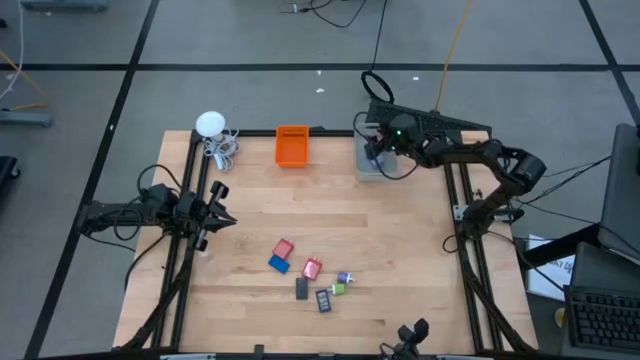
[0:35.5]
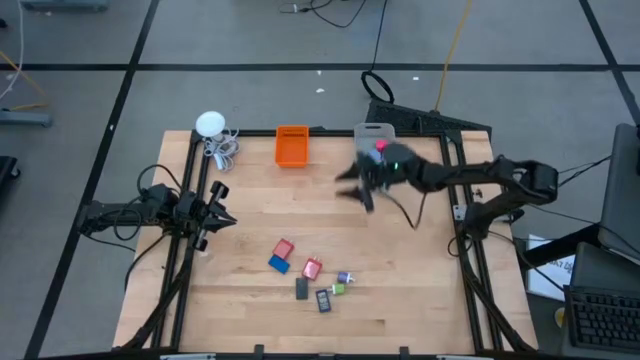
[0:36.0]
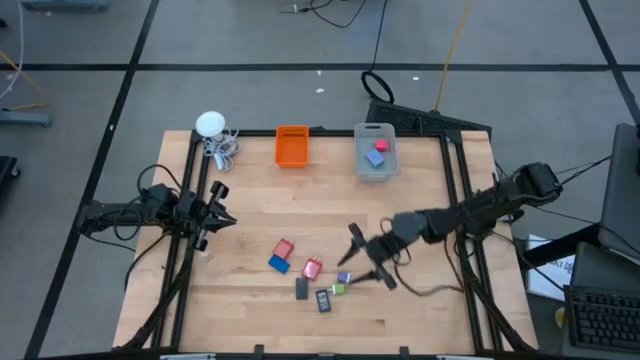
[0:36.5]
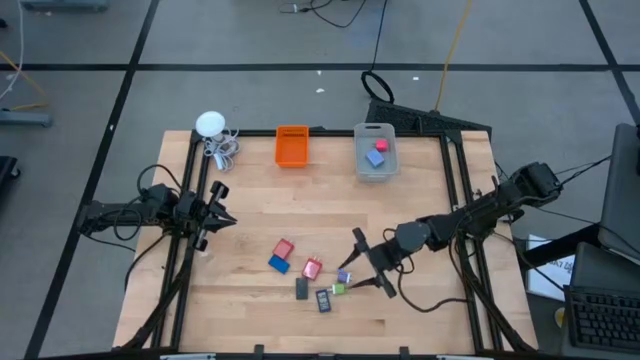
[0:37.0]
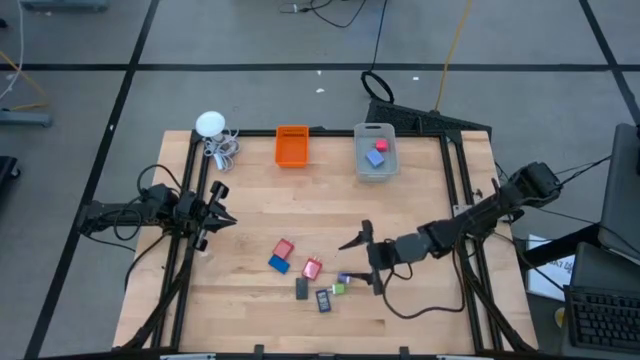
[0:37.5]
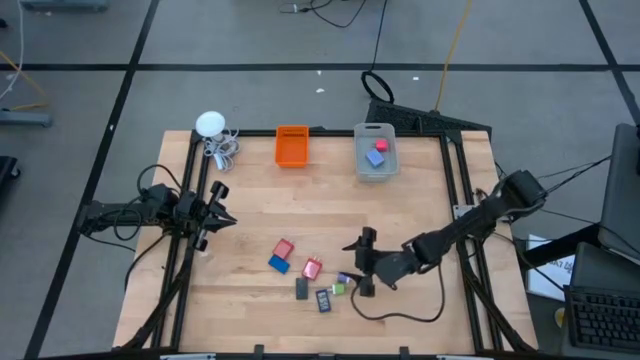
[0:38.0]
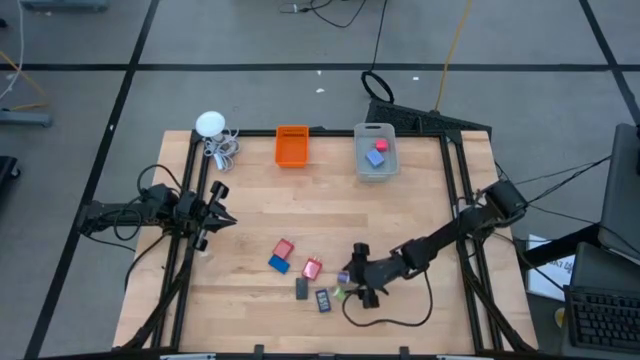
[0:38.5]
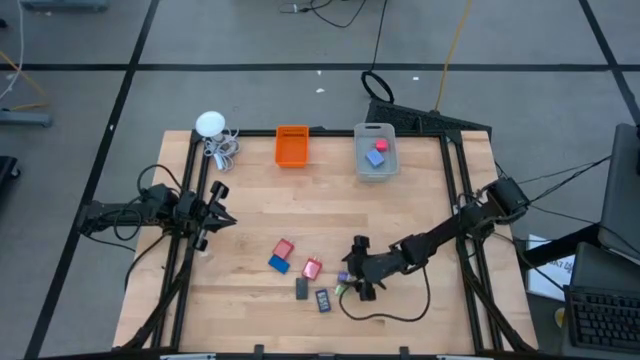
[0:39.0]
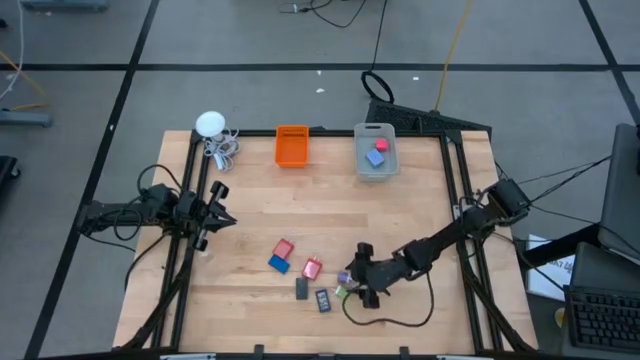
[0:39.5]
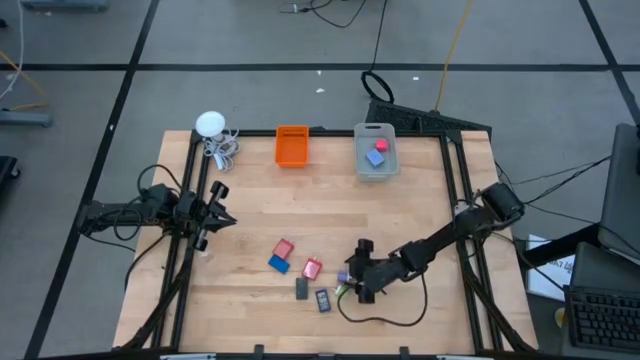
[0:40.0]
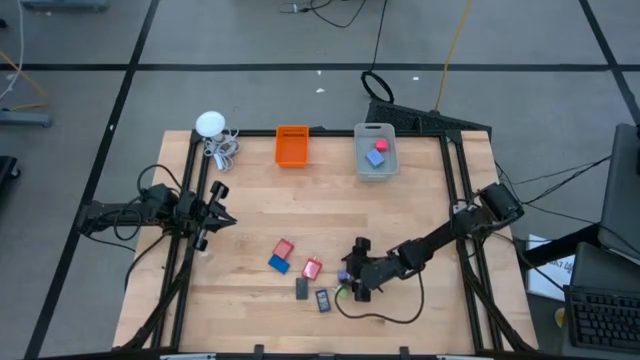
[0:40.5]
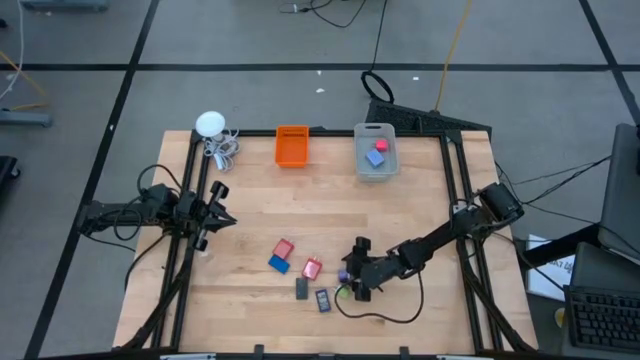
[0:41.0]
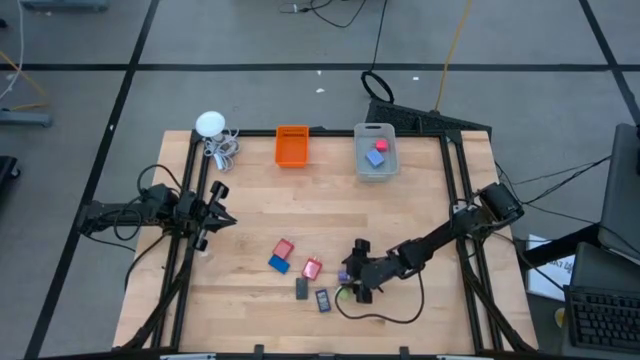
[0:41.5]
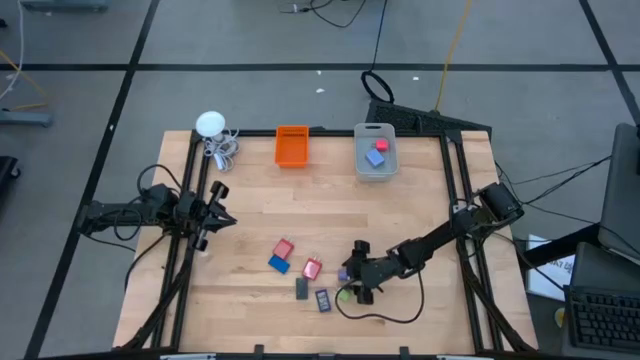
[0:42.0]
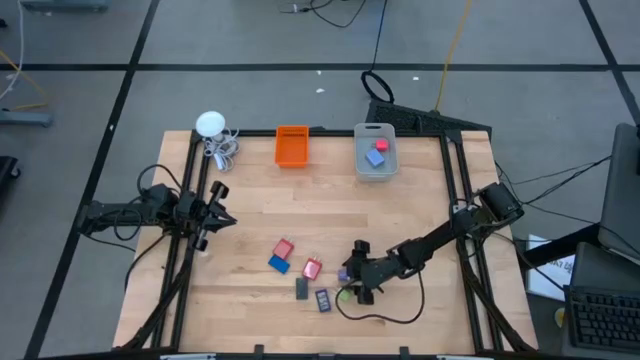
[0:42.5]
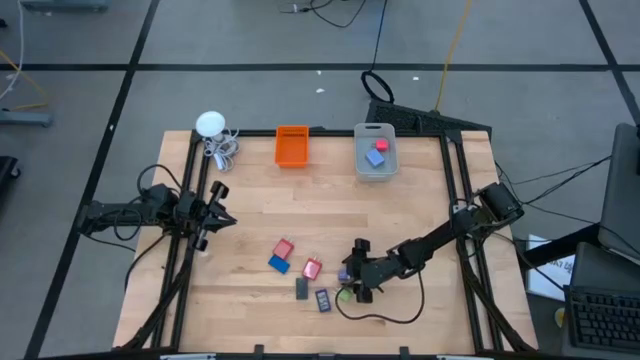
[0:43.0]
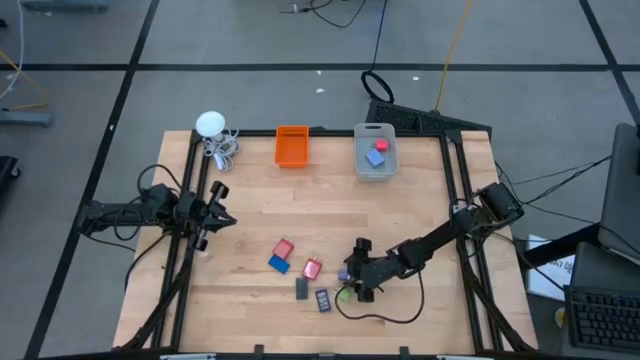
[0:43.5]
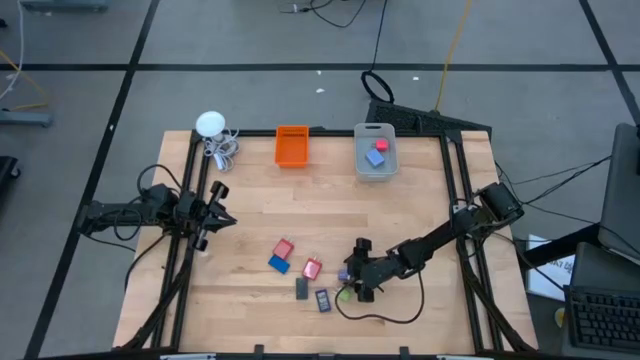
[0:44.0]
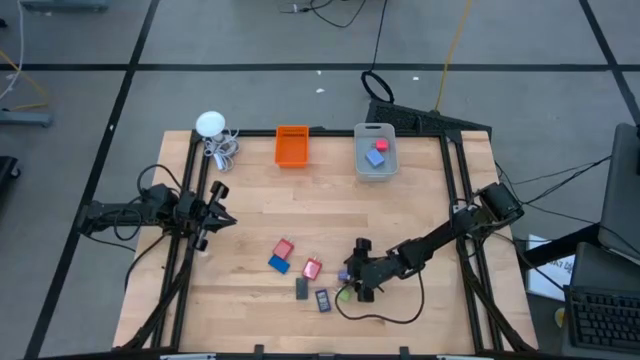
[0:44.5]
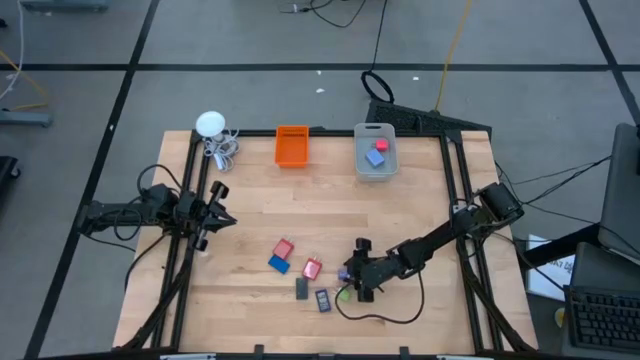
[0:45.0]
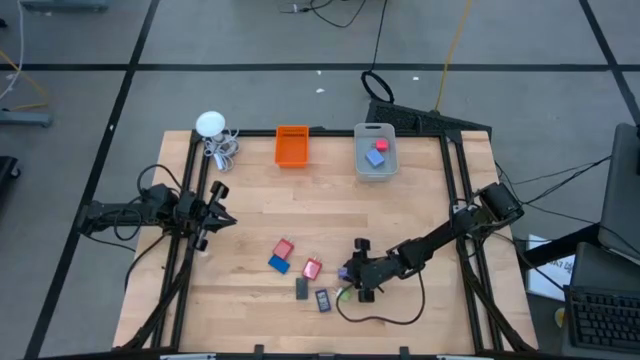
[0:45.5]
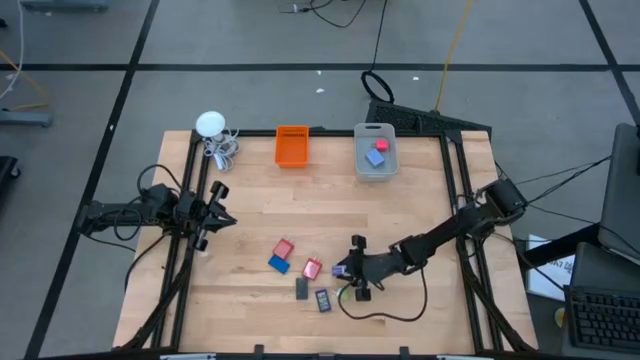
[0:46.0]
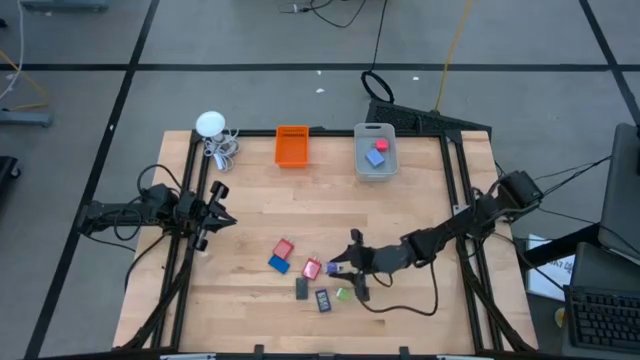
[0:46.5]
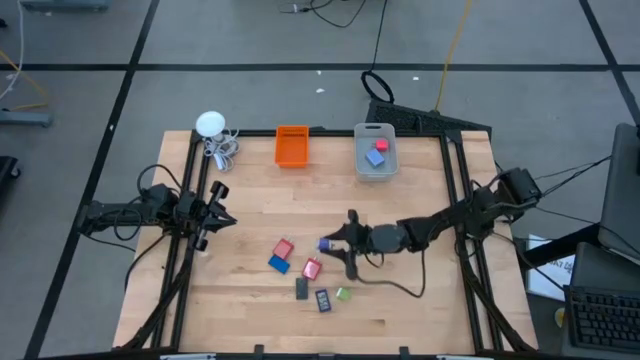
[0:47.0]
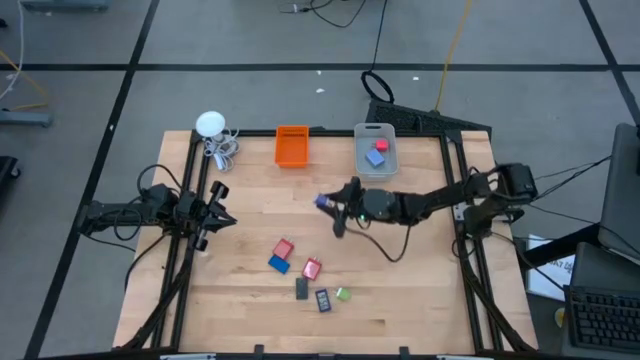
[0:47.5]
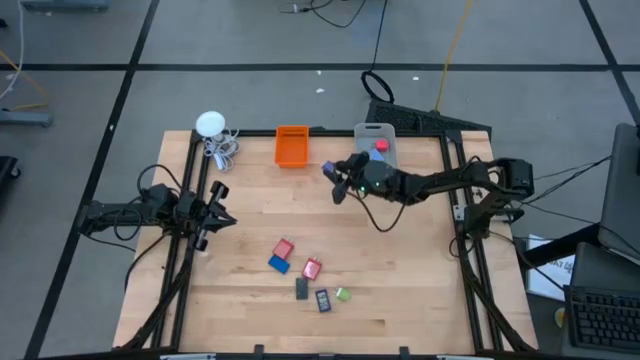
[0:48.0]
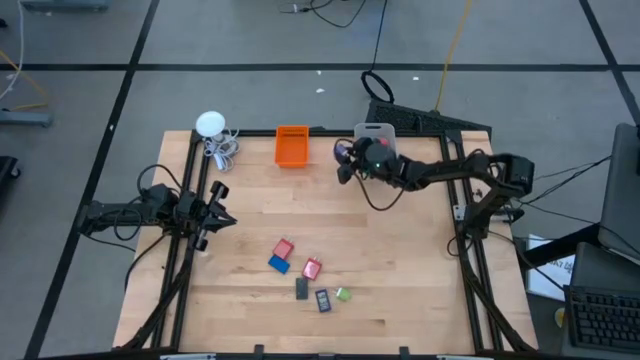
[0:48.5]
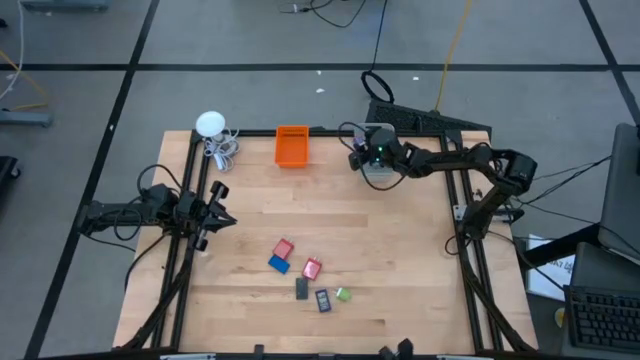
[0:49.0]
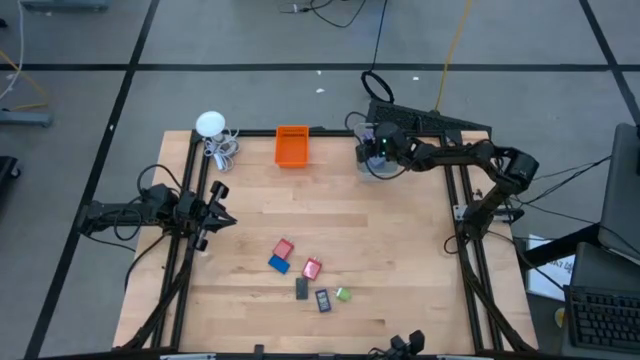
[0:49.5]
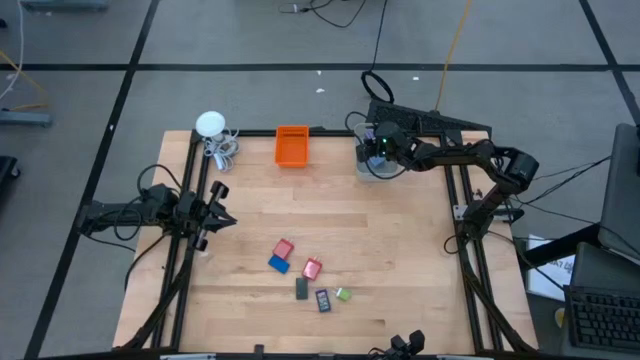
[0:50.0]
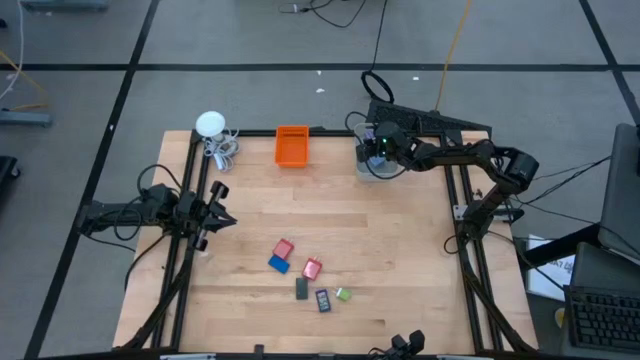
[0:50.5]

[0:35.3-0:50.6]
Task: Pick & Place Office items
Put the purple charger adapter into the gray bin

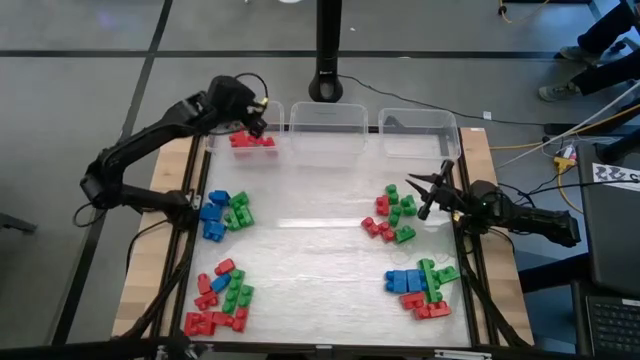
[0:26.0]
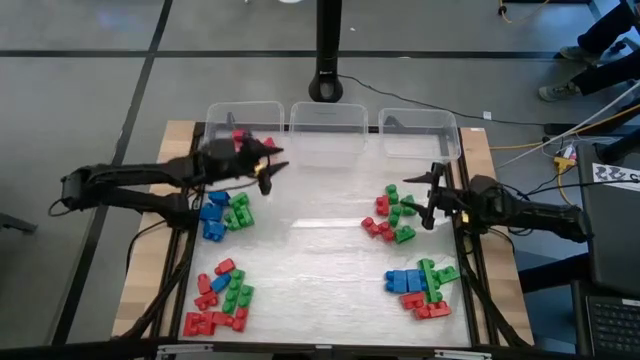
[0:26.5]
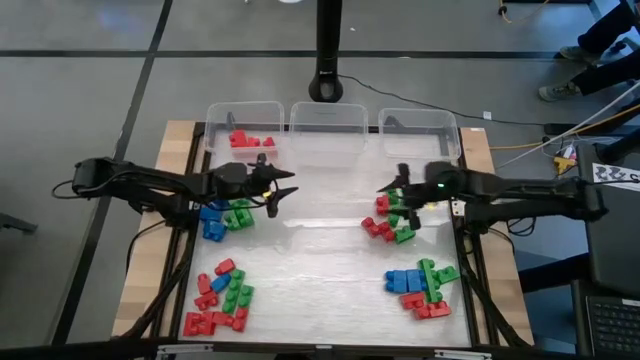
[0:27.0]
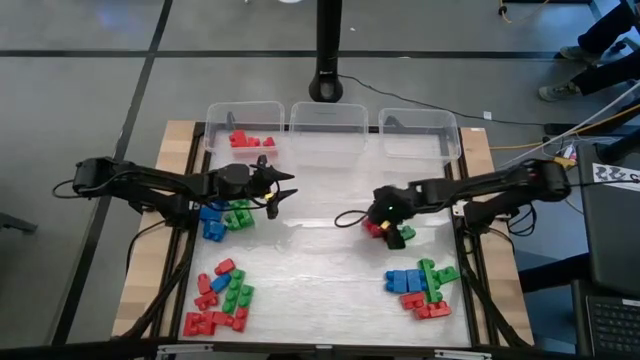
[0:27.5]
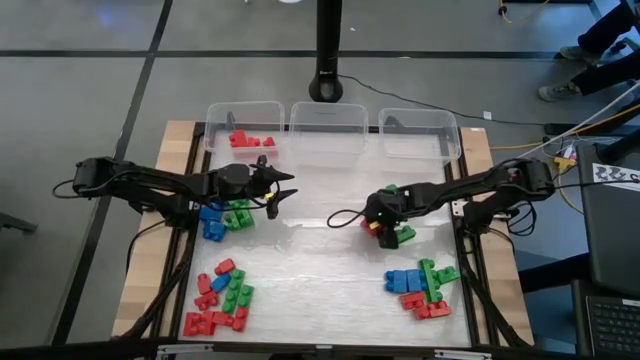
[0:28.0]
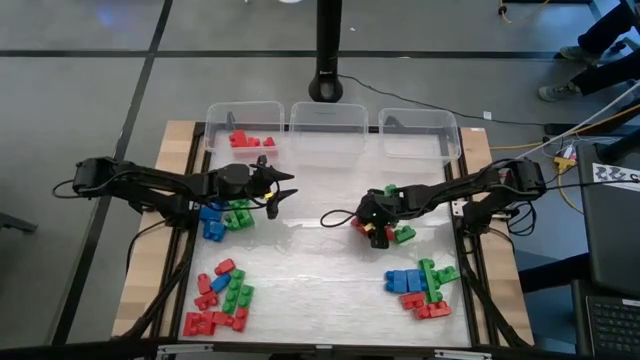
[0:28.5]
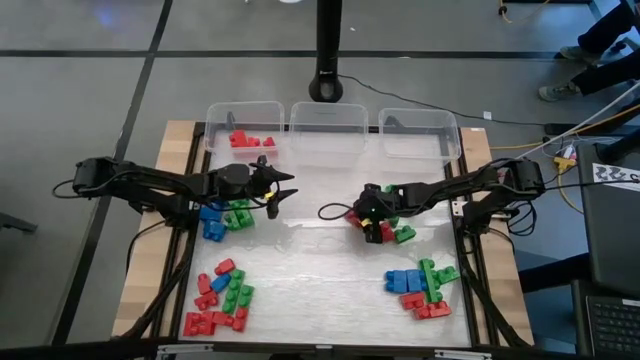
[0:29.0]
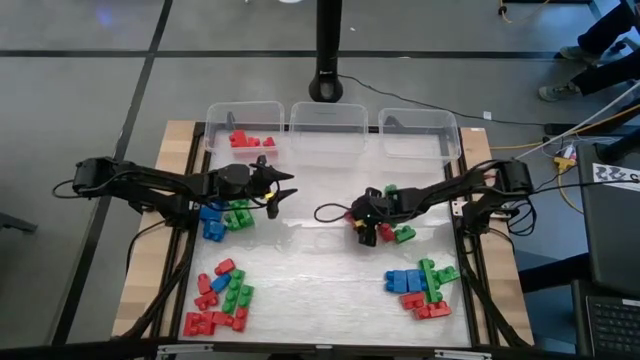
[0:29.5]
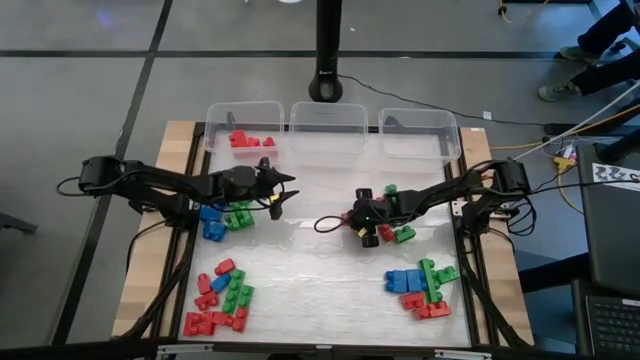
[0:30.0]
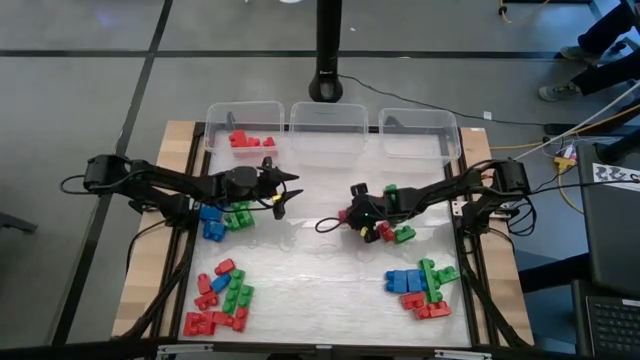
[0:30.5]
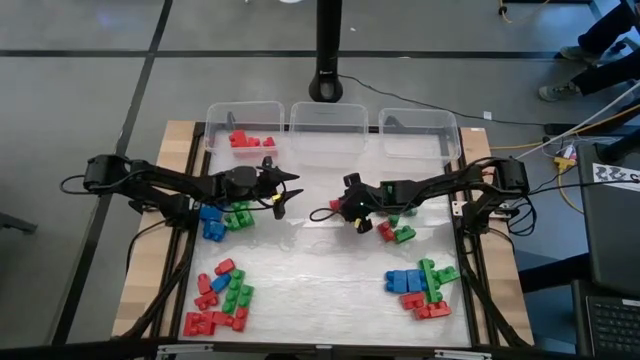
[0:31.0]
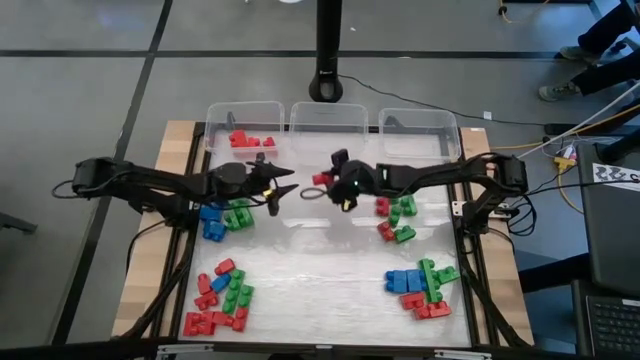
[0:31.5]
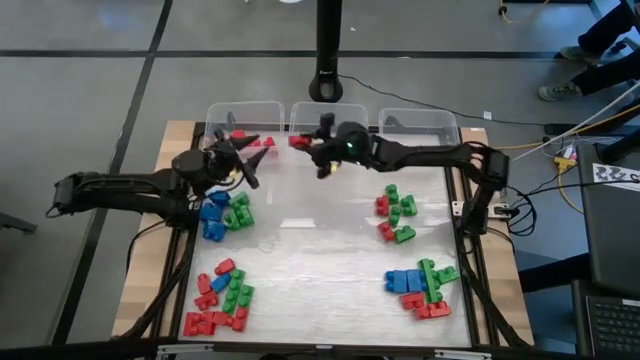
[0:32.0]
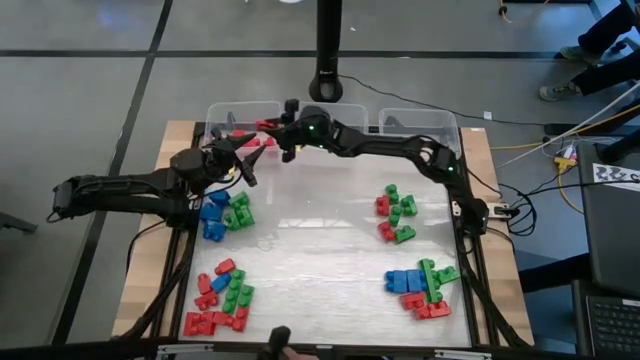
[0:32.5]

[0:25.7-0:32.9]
Task: Sort blocks
Put the red game piece into the left transparent bin
